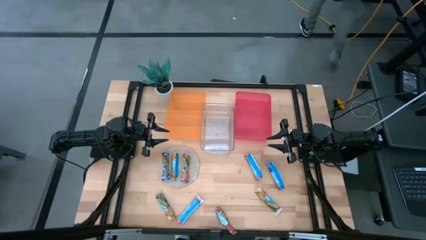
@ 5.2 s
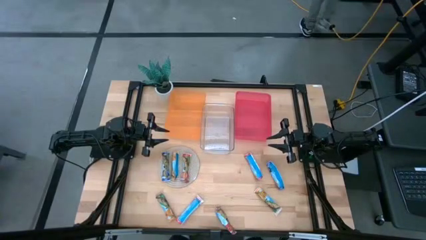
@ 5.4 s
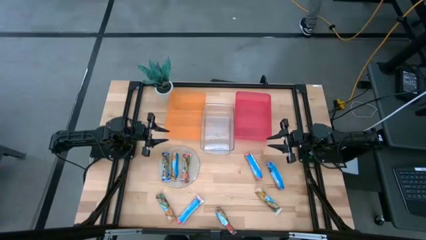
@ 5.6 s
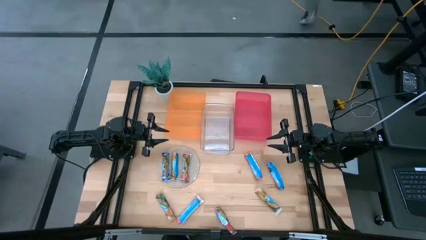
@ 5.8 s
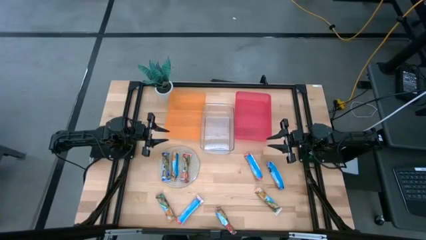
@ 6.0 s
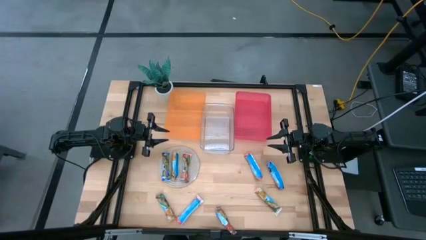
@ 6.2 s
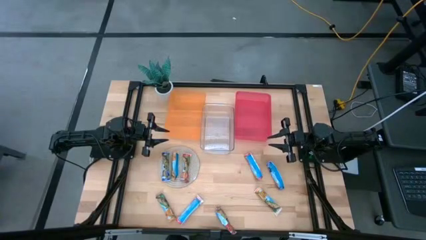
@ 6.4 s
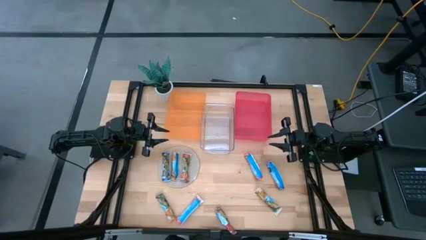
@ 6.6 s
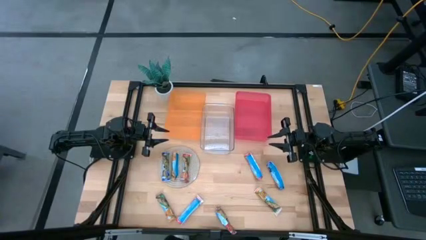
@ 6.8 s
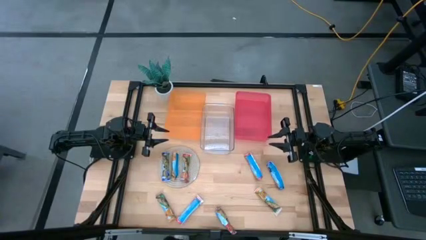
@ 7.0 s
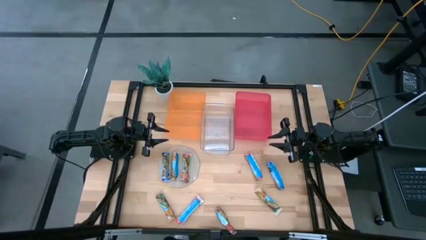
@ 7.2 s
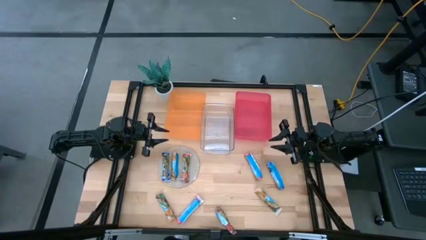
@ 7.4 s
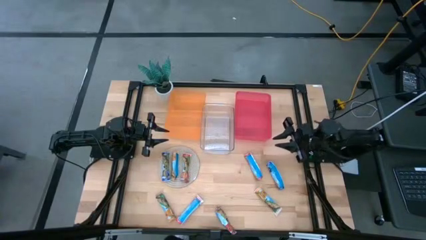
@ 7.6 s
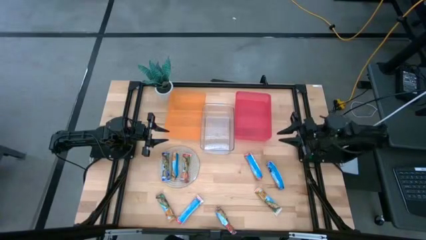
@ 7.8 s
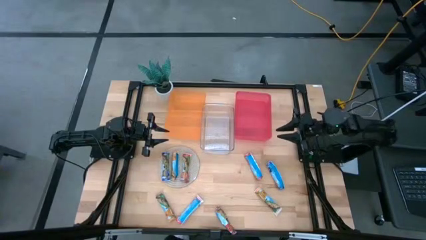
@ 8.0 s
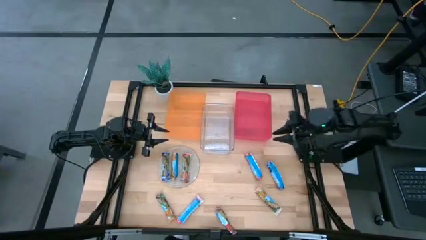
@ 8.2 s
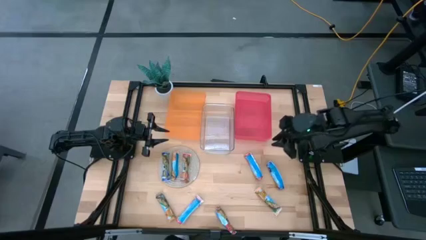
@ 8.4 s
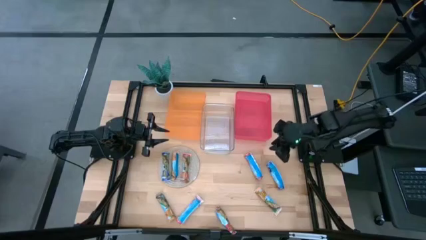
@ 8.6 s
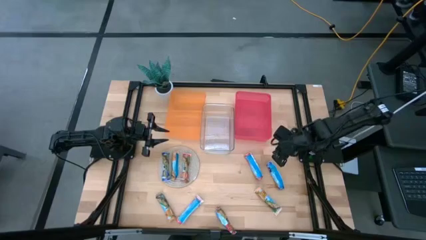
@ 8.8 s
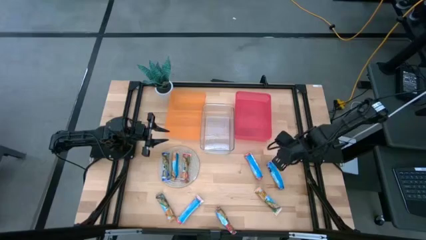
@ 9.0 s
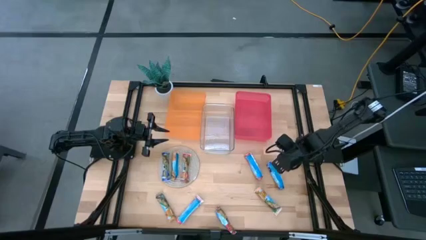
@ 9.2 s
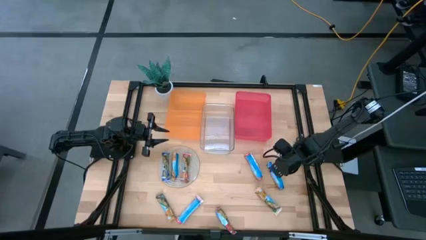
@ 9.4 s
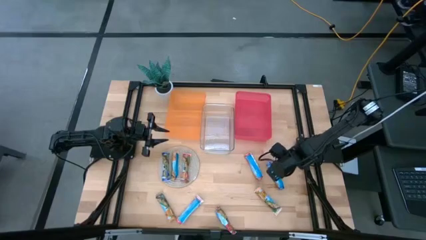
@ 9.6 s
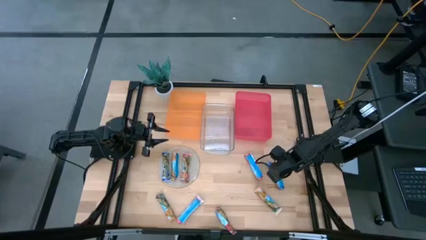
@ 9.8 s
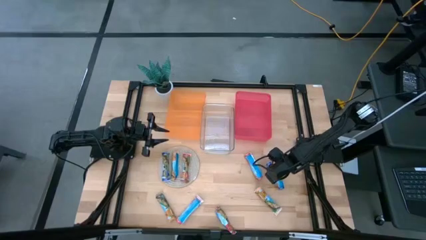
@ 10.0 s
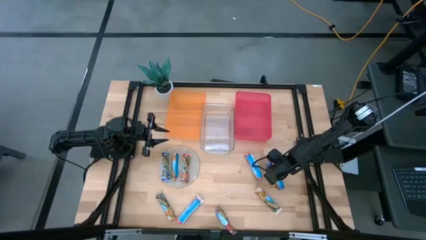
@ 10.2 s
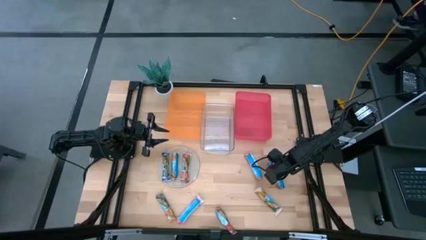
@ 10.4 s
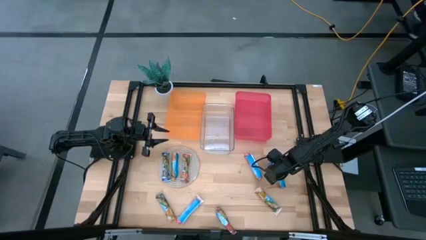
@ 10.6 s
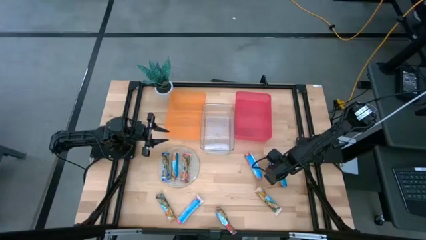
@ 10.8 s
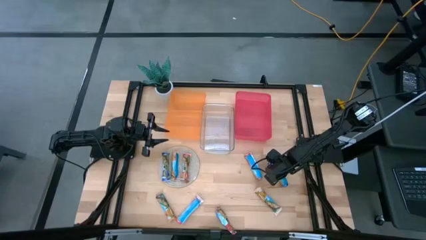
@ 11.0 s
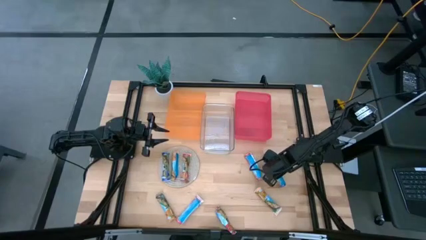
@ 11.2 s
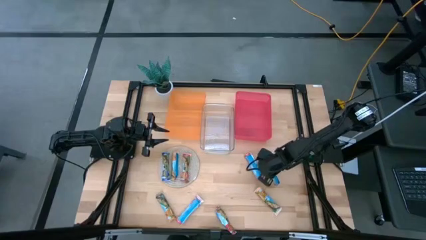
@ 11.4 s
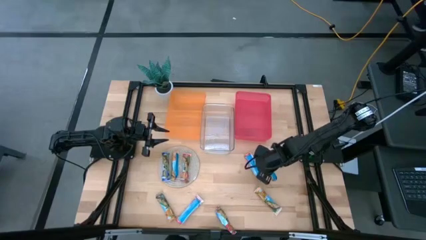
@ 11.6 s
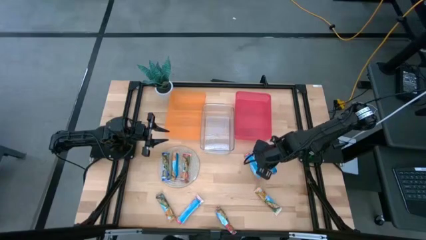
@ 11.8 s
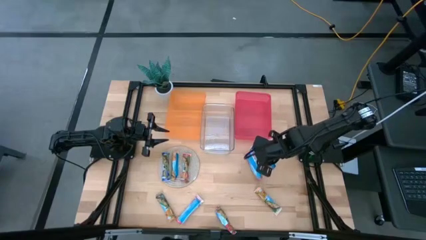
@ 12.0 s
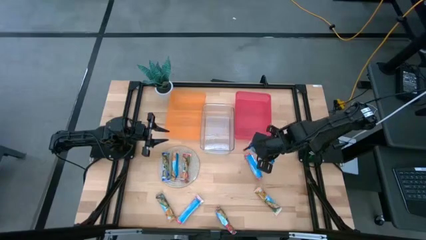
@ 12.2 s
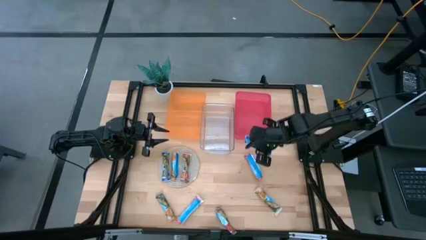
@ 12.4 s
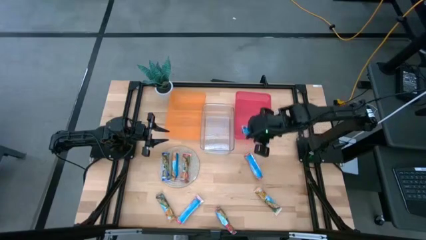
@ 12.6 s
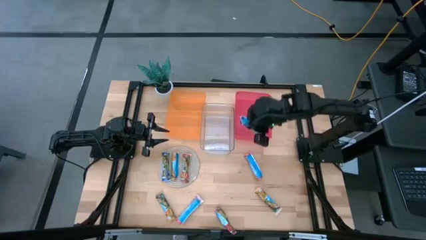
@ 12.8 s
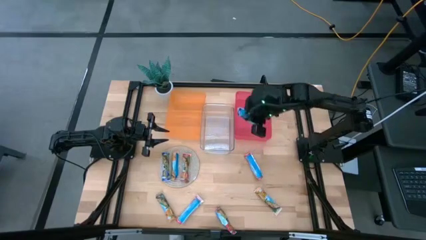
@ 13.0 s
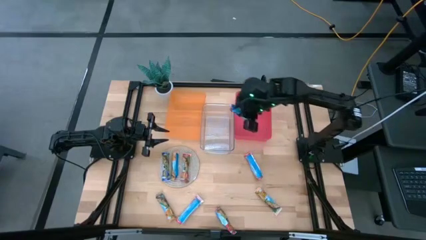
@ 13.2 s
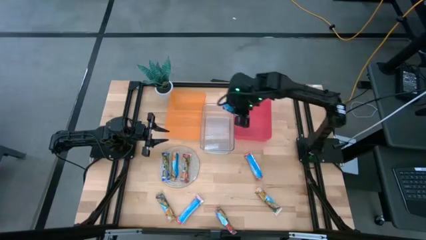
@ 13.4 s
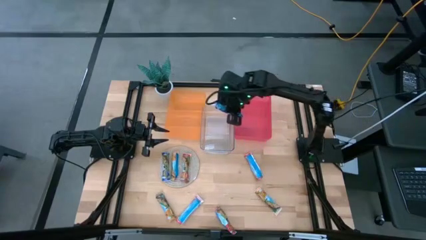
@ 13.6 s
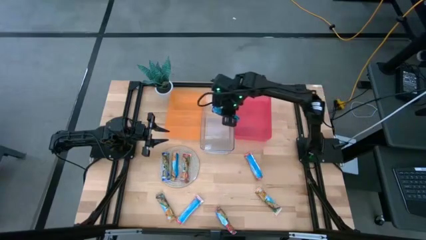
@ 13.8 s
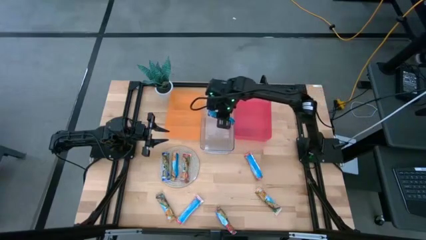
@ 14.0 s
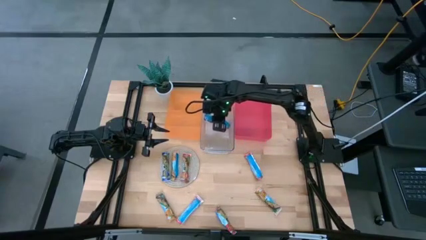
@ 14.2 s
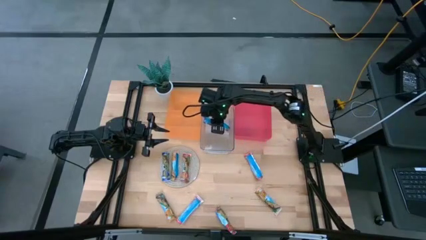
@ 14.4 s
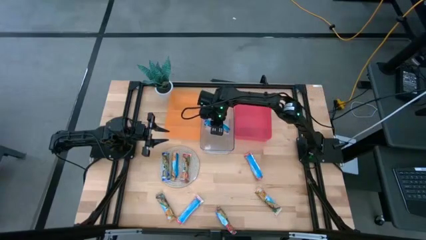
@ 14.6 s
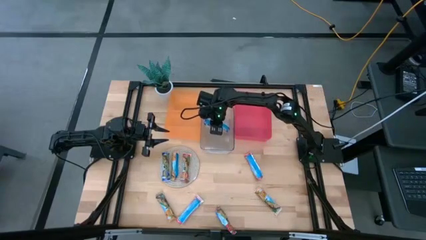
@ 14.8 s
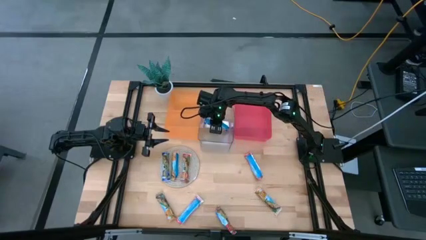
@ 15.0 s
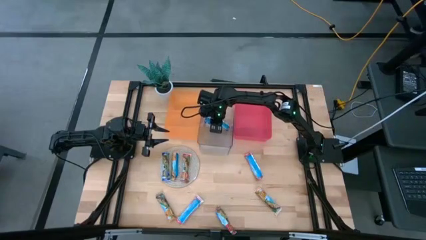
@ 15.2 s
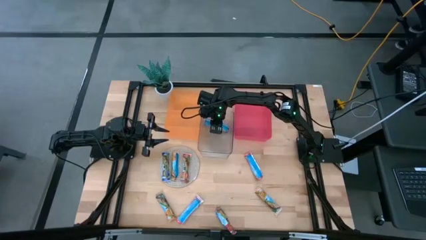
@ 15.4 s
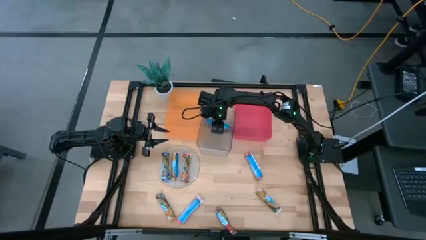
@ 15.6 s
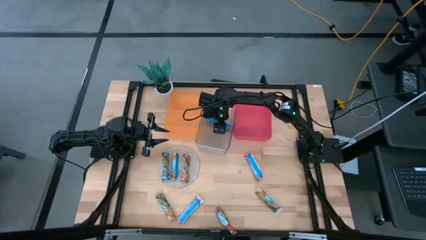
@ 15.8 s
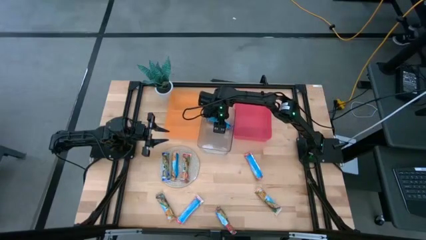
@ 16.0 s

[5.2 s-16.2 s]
Task: Pick and place Granola Bars by type
Put the right blue granola bar into the transparent bin
